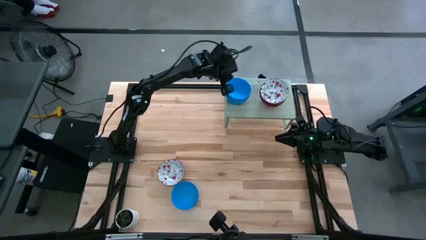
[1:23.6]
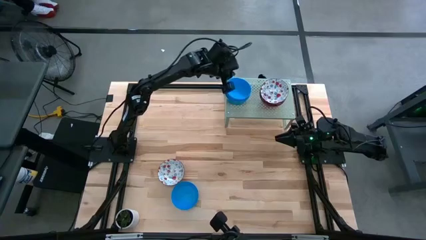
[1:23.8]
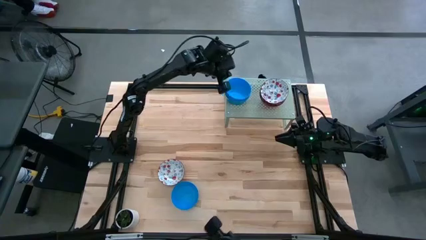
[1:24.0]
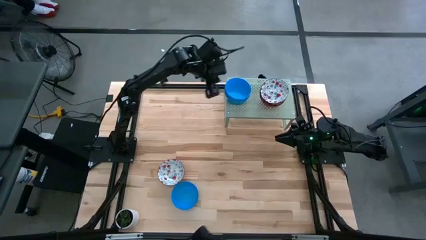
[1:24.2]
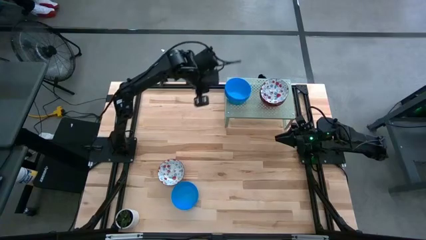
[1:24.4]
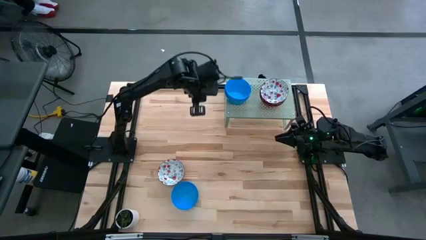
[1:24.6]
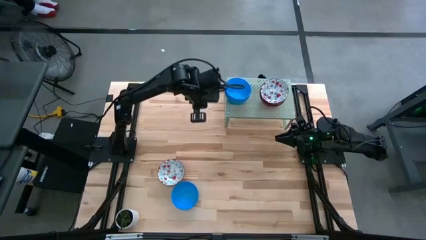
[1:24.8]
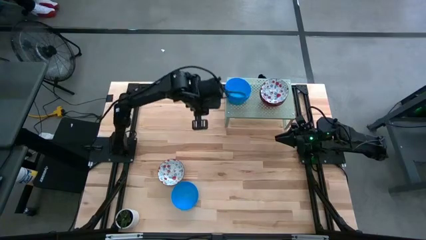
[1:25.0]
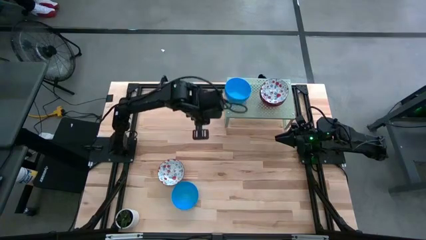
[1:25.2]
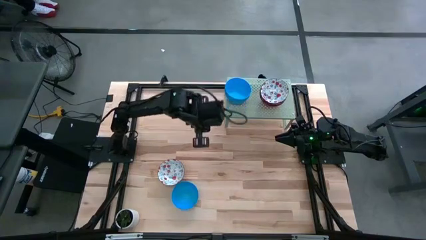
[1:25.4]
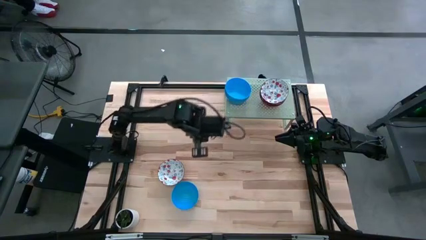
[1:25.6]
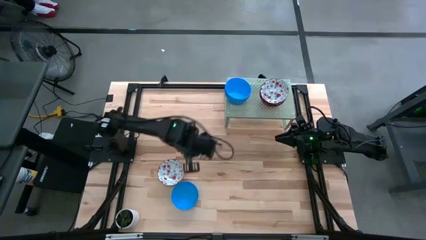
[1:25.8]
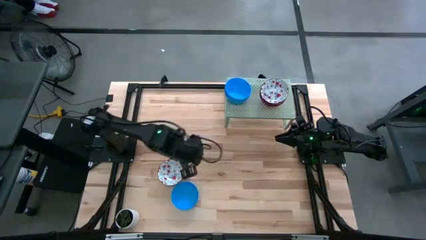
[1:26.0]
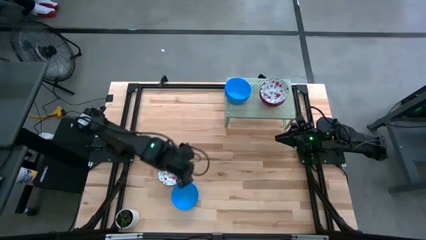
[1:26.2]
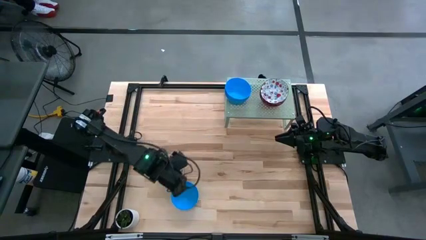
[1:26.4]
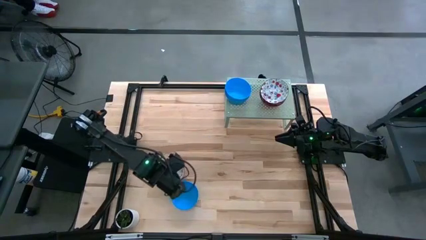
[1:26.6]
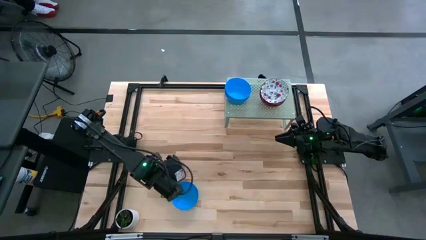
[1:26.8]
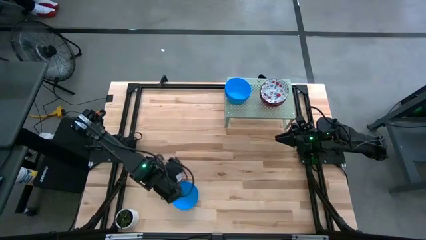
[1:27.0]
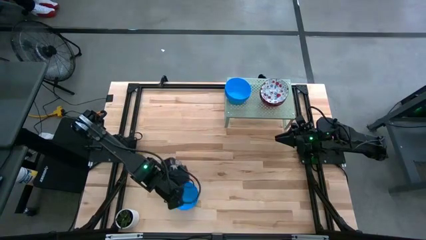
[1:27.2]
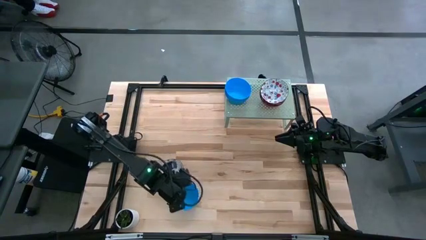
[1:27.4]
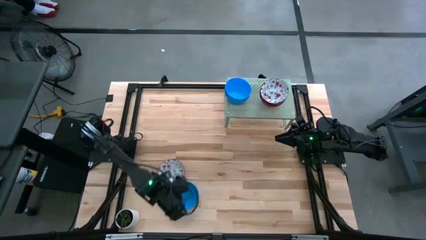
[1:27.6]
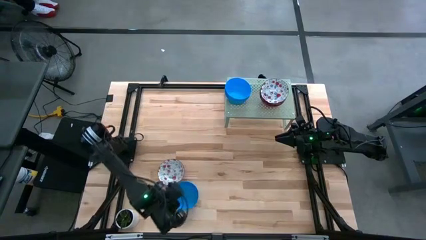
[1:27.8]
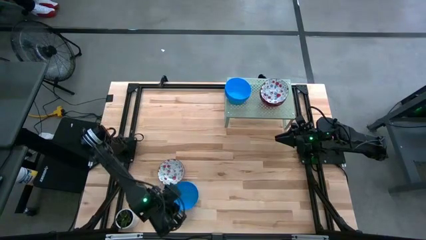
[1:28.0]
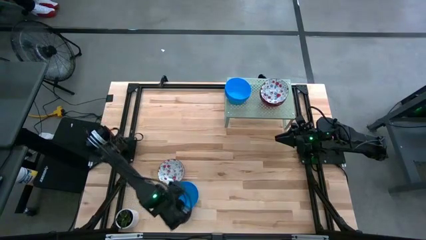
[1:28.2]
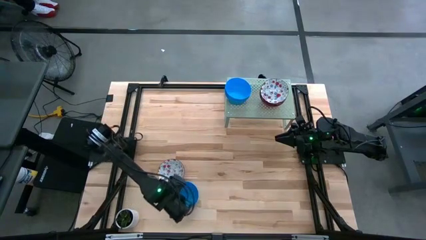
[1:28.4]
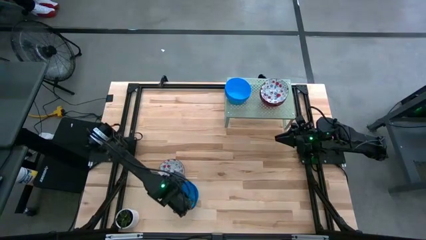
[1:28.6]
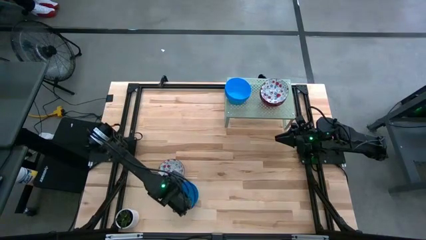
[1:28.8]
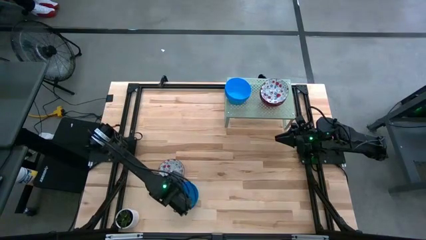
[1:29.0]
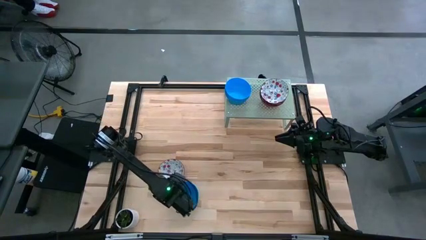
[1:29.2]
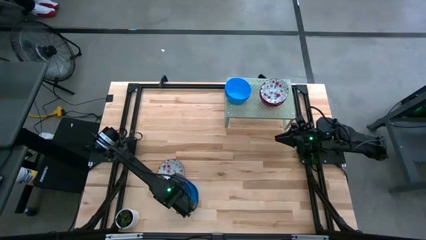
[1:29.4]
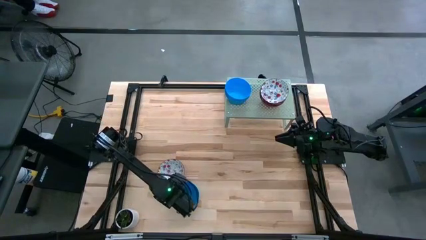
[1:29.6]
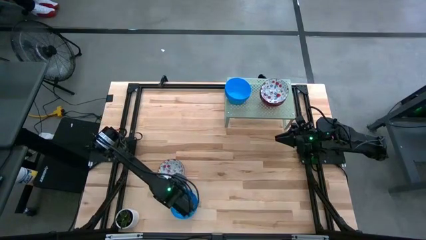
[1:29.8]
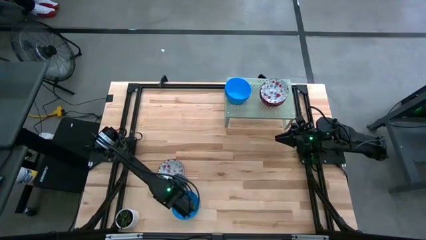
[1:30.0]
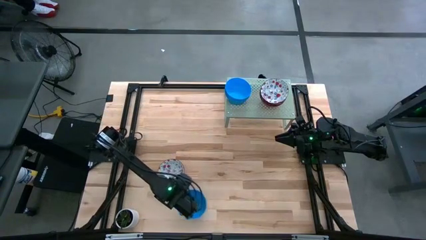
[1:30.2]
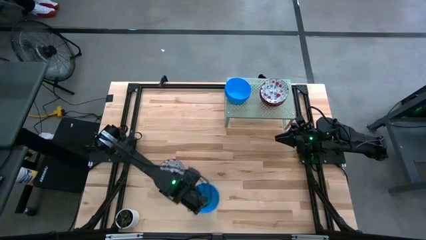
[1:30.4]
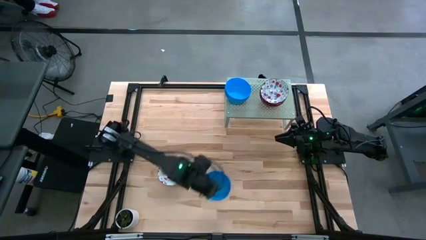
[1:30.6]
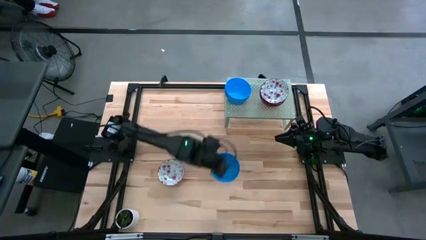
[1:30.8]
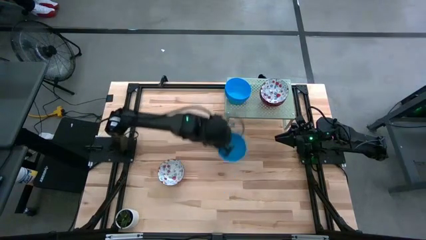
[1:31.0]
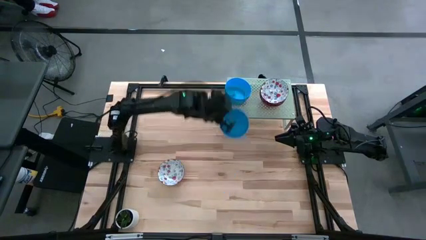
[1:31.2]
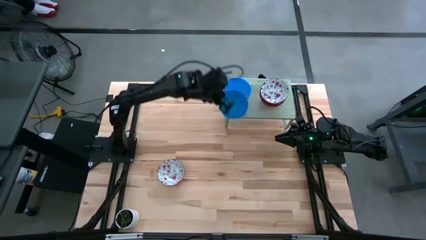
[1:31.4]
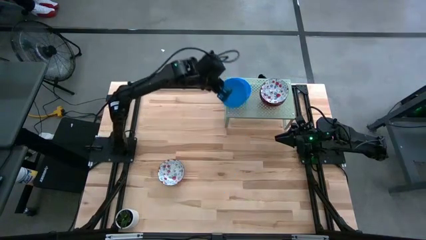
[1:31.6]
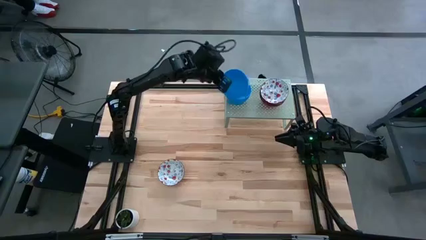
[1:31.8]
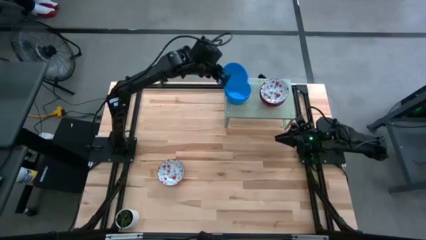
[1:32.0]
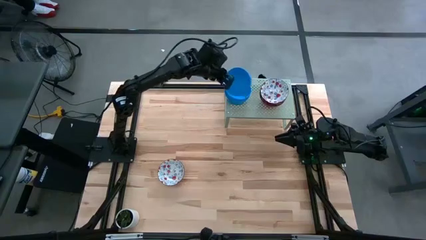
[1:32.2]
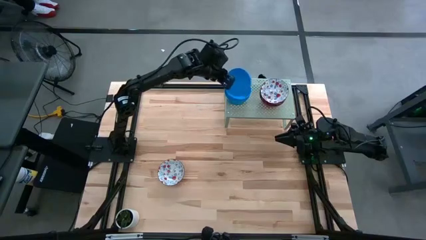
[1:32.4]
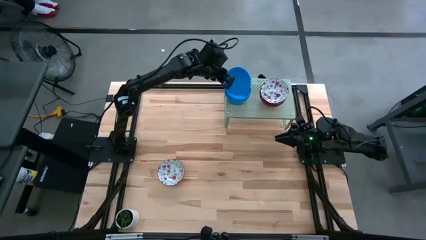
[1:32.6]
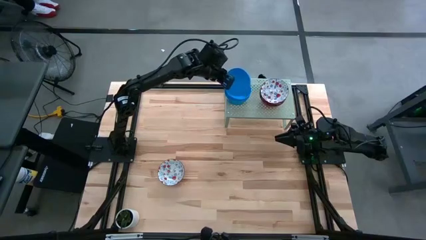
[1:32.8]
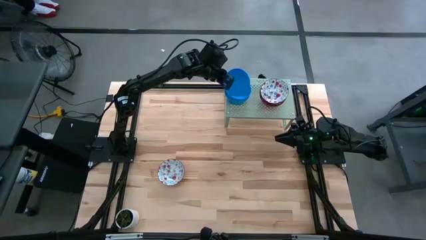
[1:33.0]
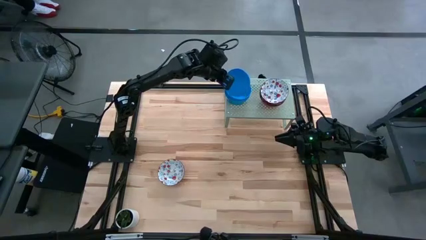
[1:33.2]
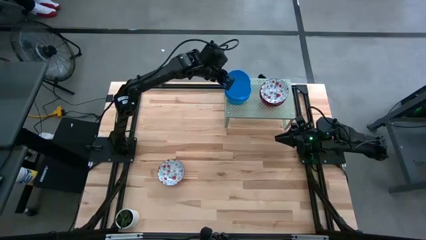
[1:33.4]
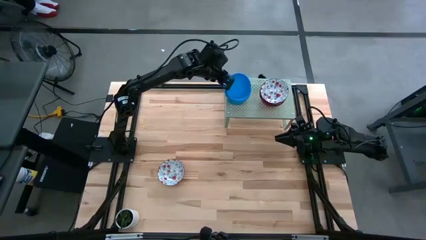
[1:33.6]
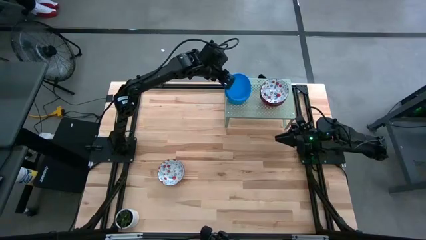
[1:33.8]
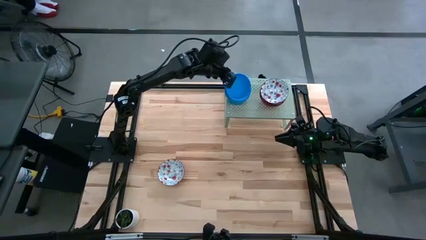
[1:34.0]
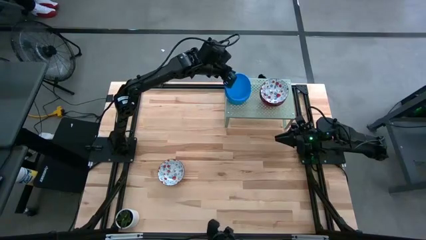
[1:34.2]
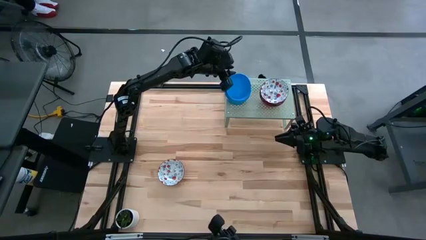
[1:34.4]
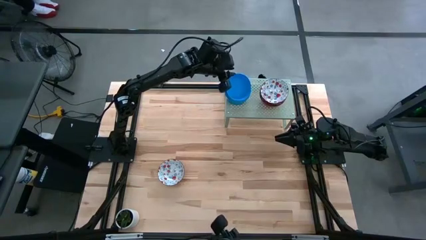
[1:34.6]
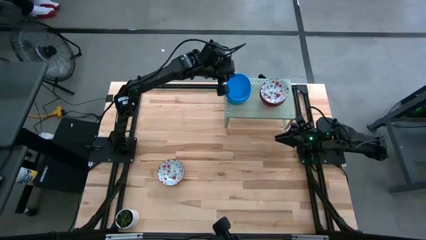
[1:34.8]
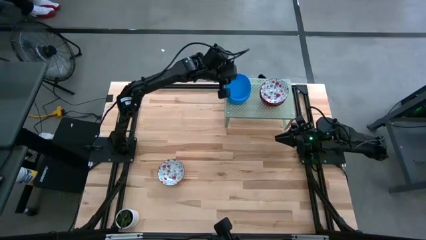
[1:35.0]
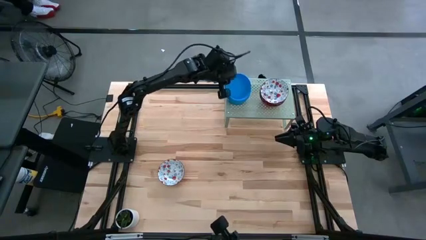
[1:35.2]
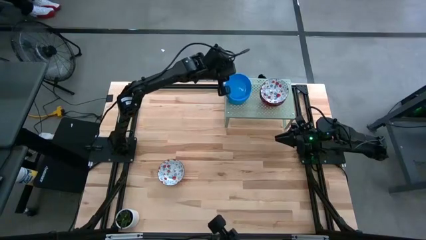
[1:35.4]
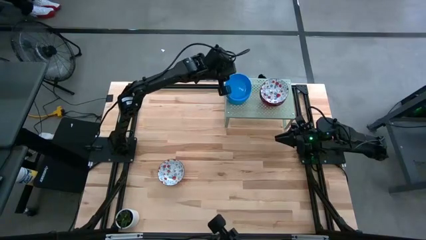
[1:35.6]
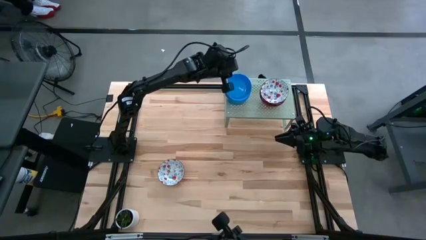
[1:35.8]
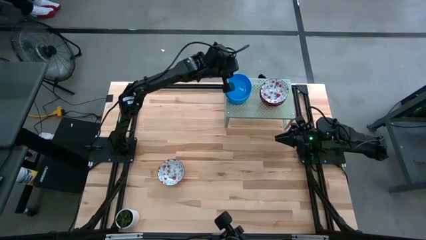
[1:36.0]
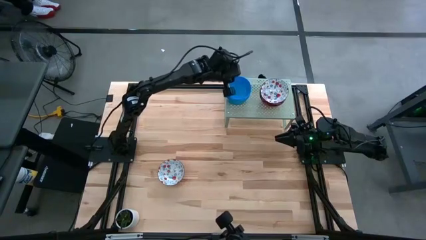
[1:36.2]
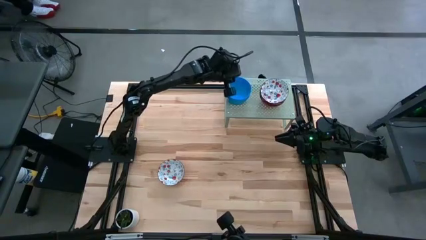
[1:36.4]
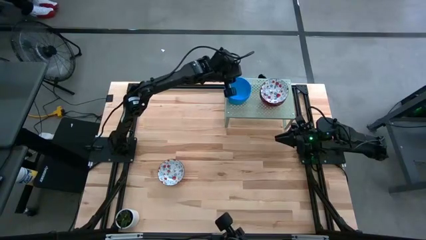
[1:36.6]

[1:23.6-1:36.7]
Task: Pick & Place Mini bowls
Stack the blue bowl on the blue bowls on the shelf
